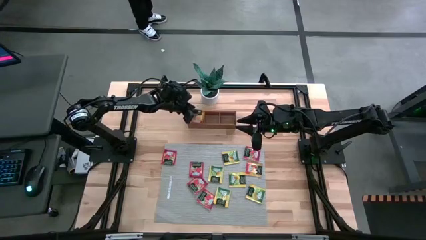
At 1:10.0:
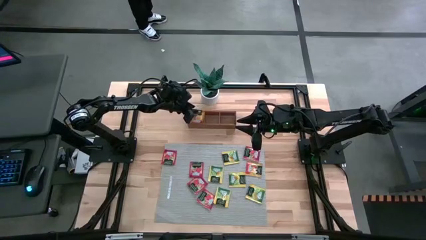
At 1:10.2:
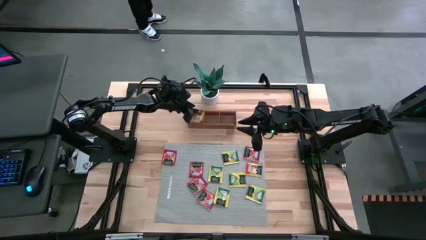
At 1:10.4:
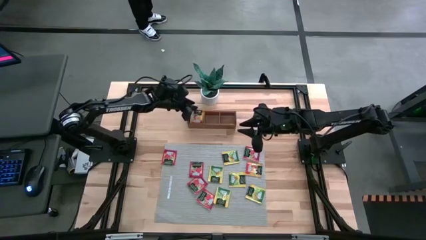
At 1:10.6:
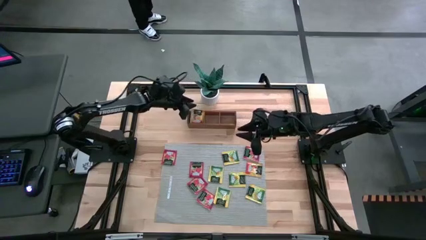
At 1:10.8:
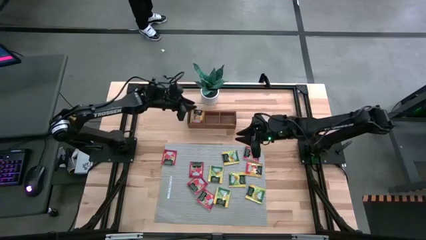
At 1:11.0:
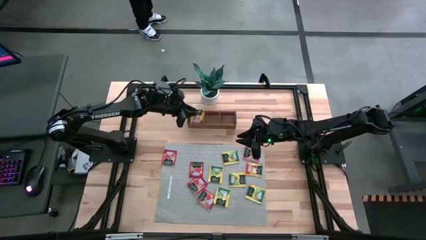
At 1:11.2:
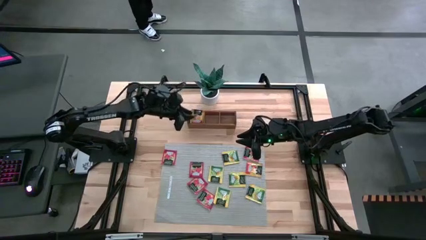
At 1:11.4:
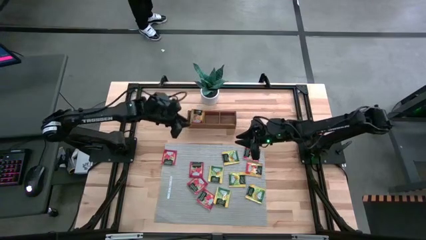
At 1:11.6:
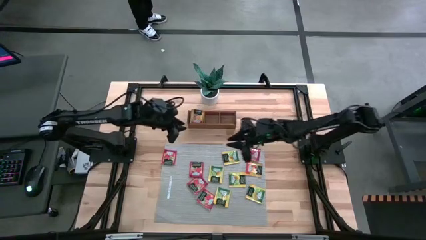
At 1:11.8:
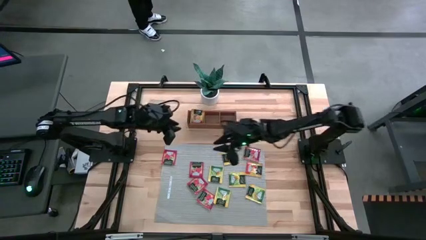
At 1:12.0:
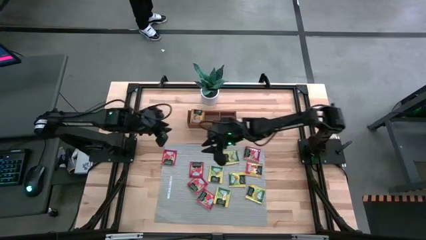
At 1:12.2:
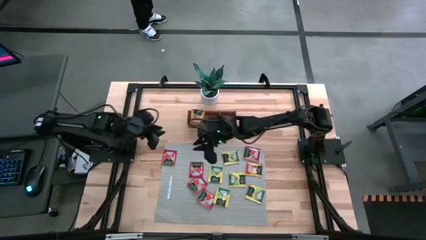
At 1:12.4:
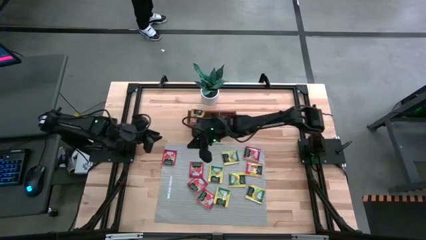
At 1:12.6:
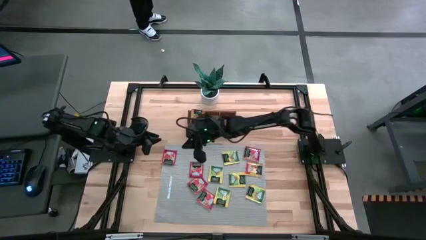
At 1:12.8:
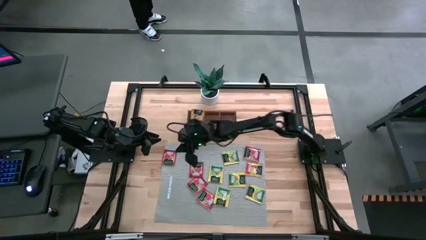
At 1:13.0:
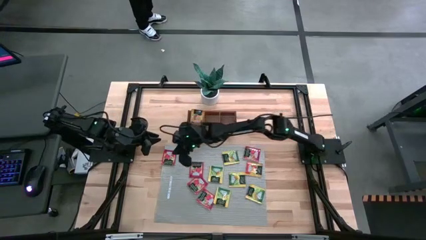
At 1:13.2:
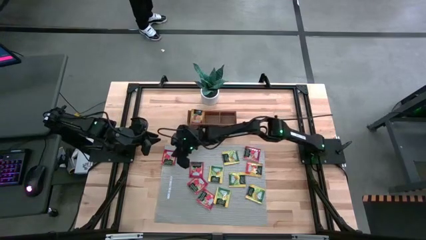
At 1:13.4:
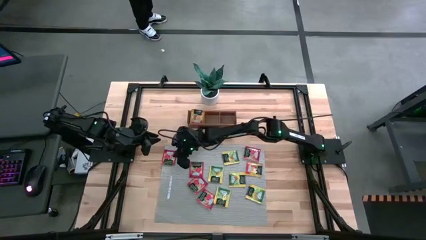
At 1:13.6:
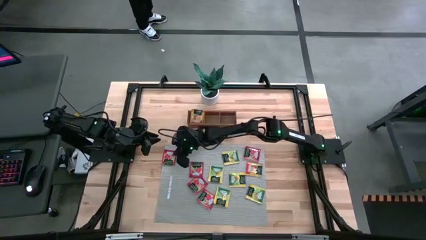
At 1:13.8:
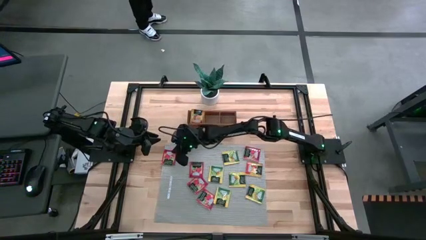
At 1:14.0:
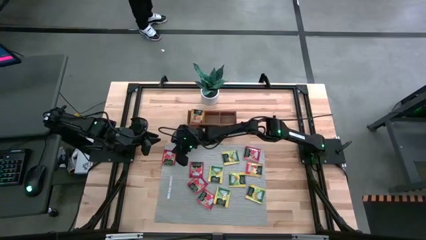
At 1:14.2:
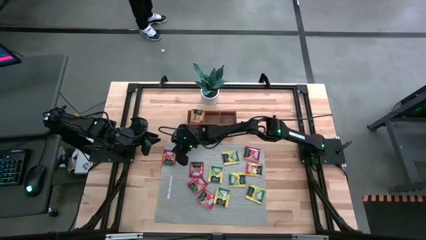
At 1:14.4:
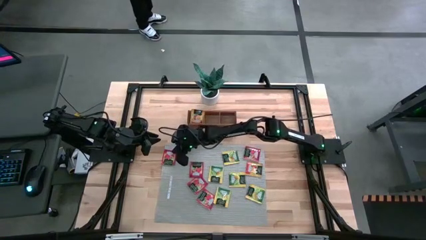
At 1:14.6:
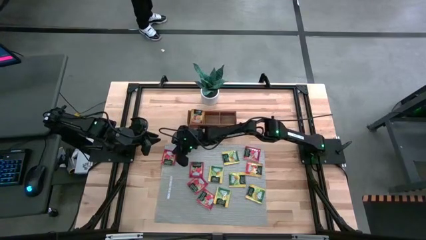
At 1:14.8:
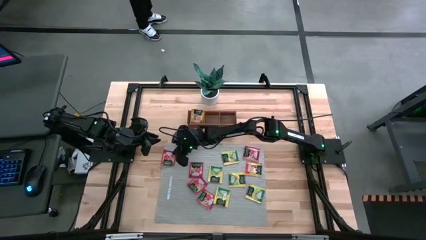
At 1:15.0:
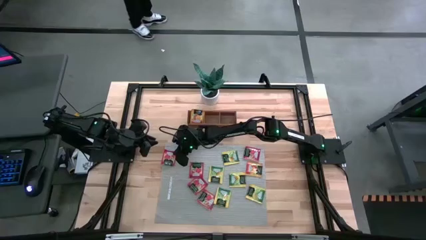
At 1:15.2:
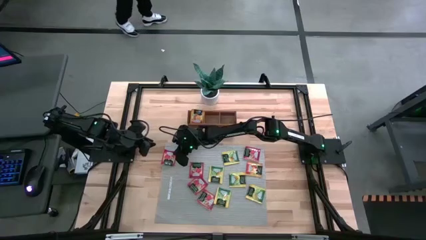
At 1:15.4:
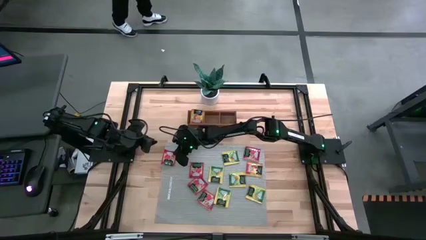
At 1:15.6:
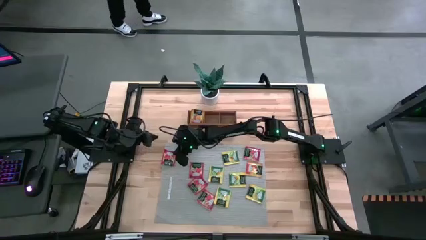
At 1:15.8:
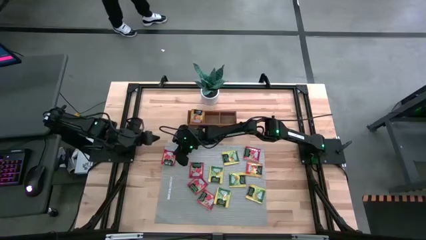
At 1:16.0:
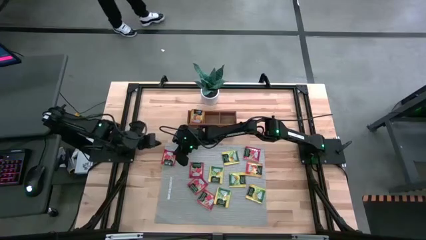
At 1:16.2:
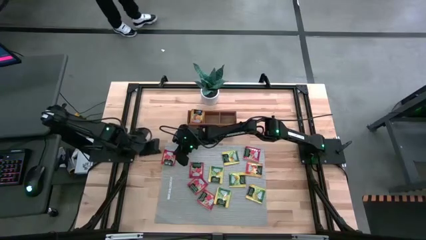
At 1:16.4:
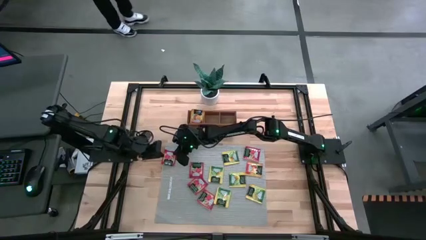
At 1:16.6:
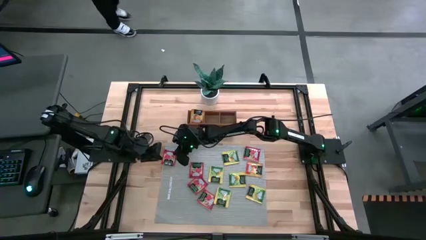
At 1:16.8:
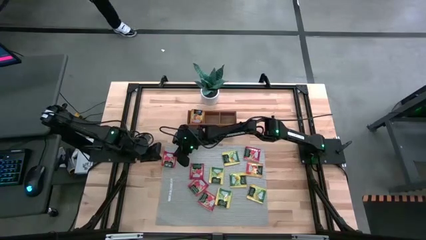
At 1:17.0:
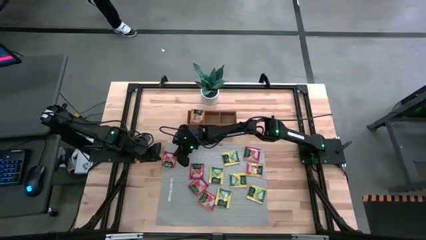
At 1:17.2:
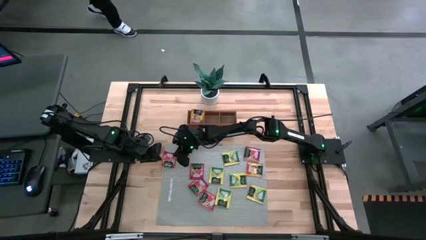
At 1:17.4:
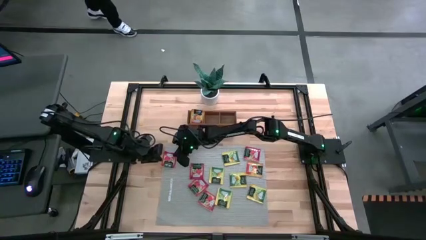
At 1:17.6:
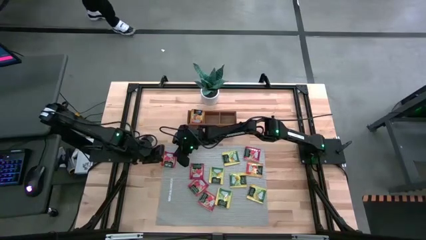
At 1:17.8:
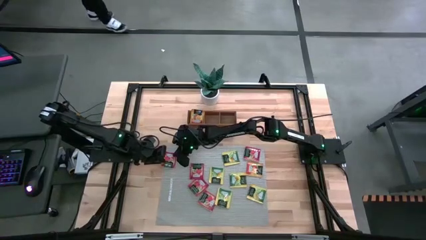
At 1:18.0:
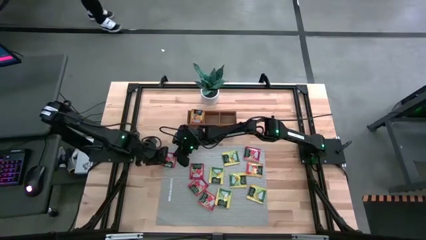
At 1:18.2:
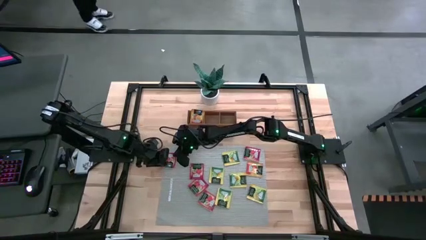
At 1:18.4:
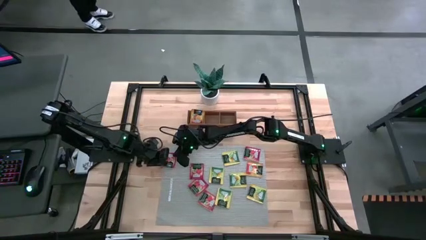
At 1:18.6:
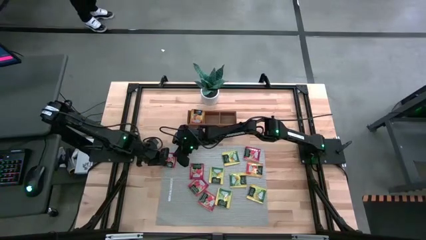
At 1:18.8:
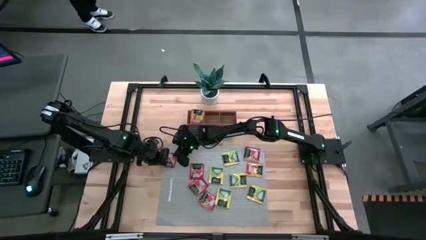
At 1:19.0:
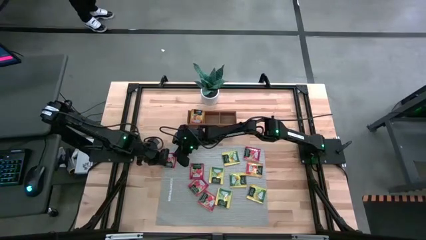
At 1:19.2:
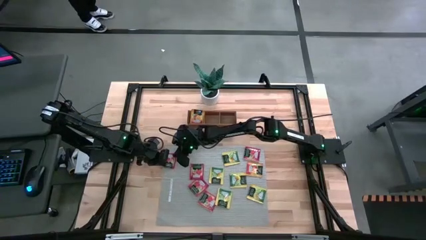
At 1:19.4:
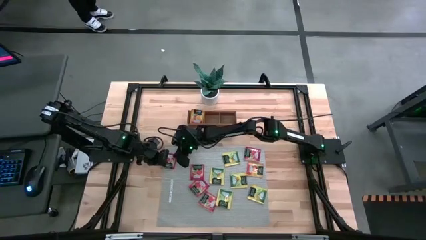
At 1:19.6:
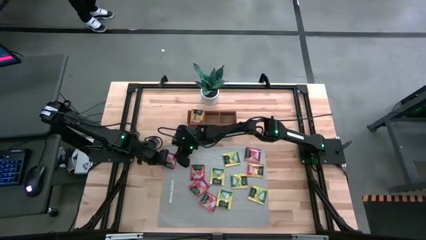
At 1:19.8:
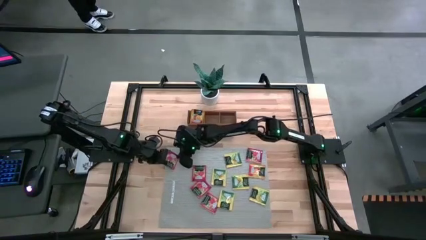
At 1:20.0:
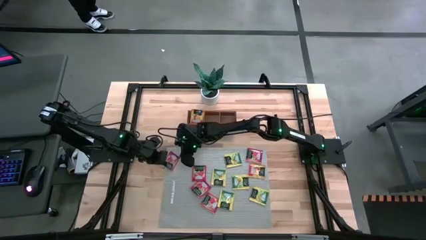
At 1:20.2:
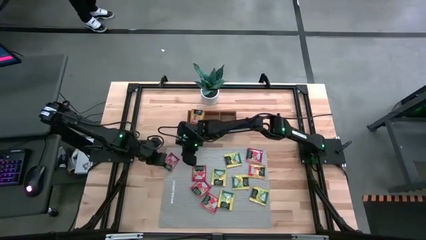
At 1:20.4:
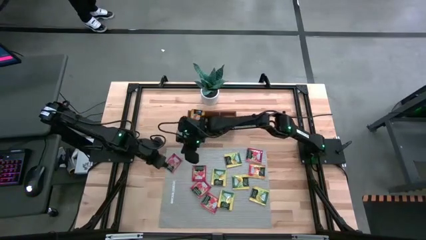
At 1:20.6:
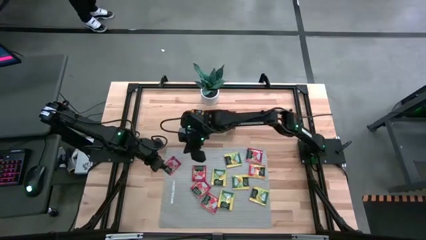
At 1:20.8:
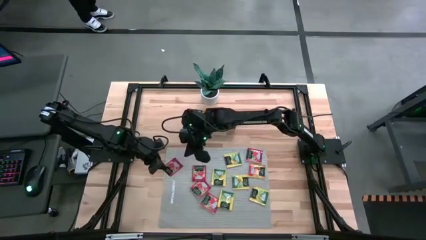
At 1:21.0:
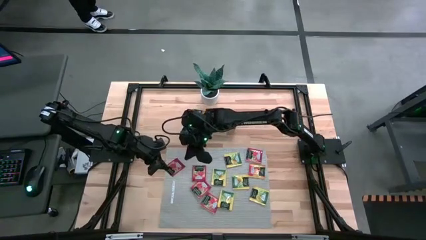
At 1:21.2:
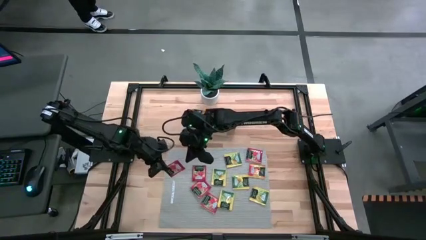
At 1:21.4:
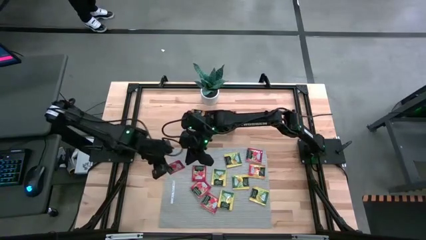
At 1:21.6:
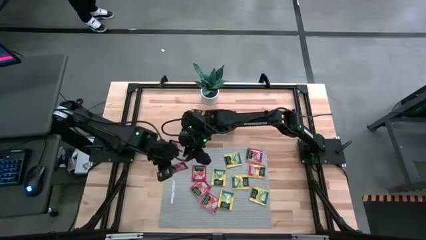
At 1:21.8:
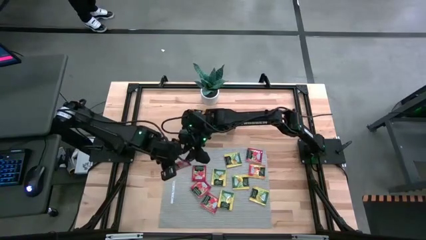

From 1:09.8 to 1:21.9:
Task: Pick & Place Tea
Put the red tea bag into the middle section of the wooden organizer
